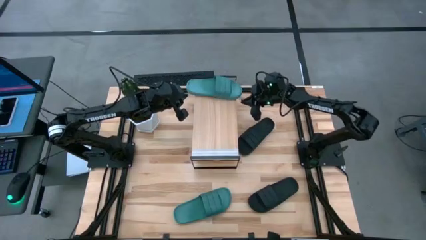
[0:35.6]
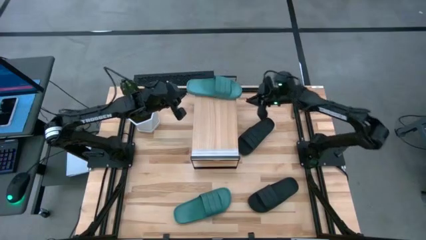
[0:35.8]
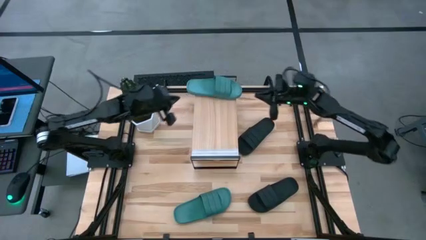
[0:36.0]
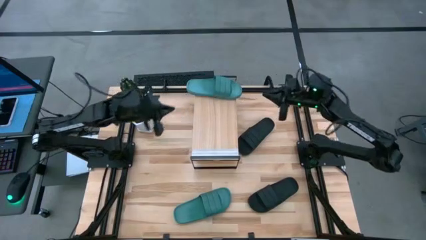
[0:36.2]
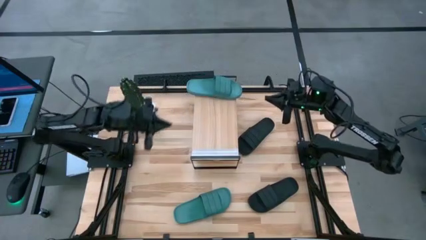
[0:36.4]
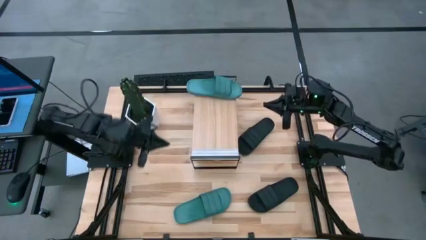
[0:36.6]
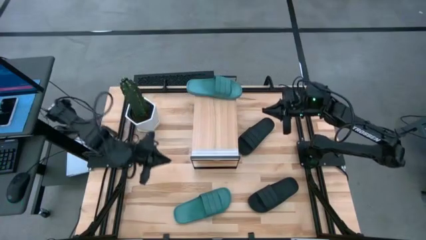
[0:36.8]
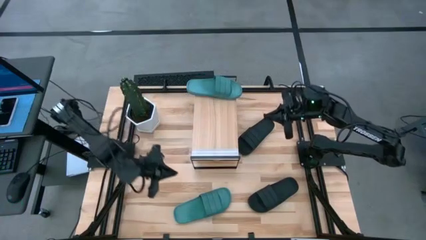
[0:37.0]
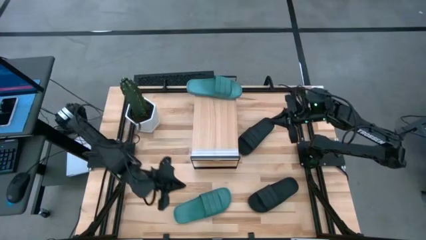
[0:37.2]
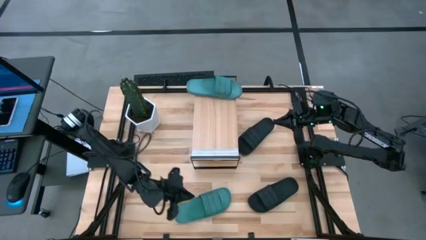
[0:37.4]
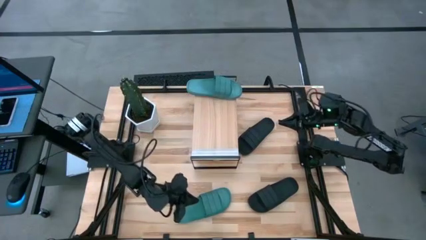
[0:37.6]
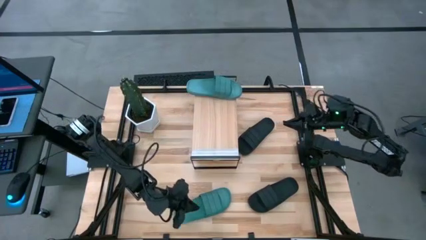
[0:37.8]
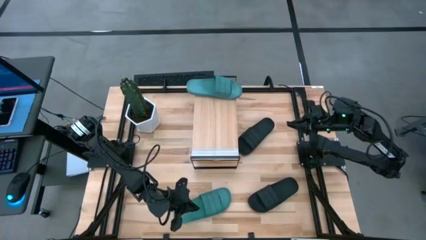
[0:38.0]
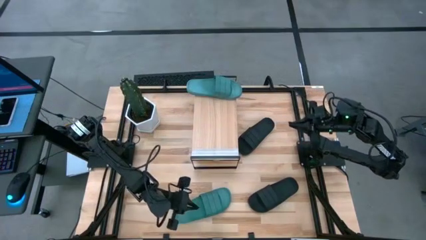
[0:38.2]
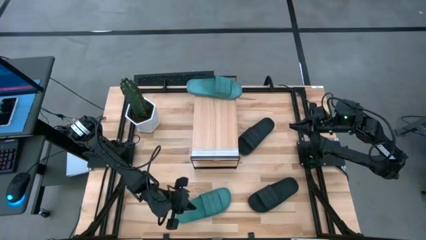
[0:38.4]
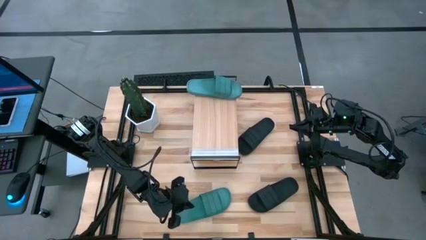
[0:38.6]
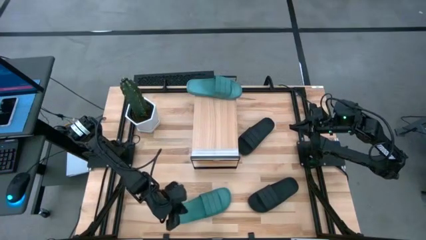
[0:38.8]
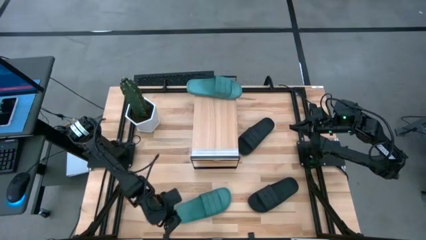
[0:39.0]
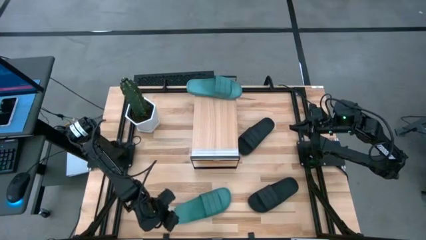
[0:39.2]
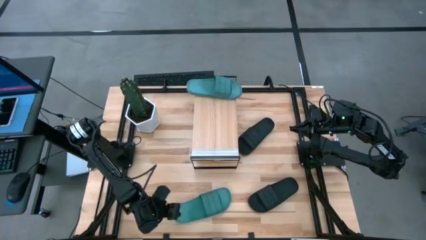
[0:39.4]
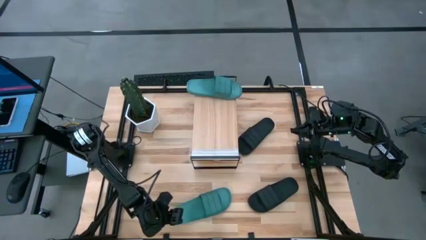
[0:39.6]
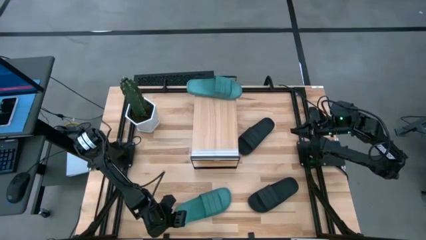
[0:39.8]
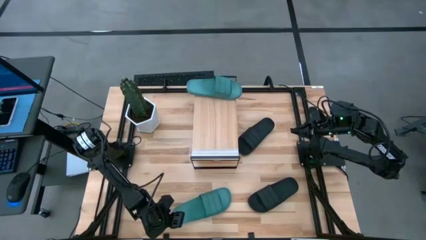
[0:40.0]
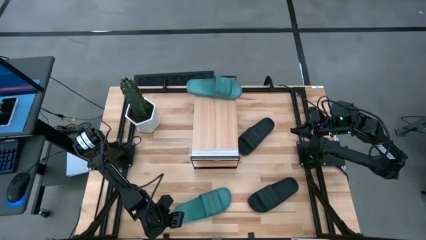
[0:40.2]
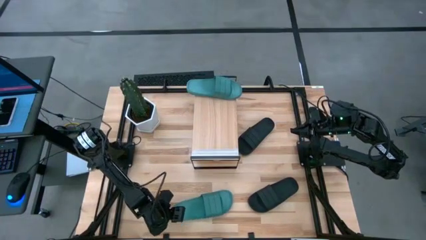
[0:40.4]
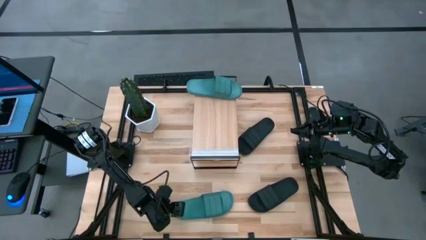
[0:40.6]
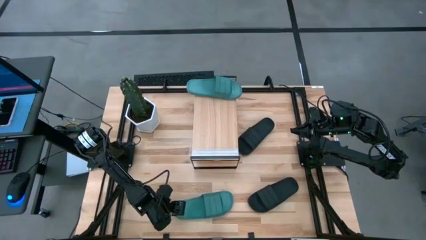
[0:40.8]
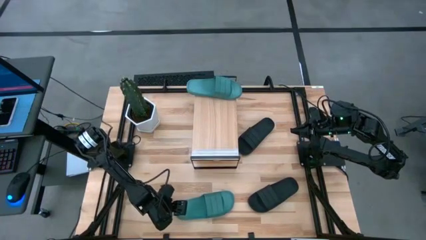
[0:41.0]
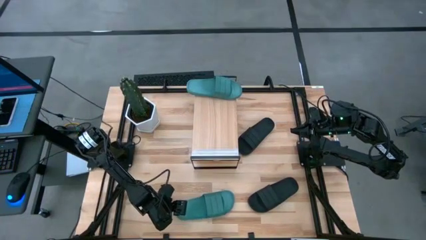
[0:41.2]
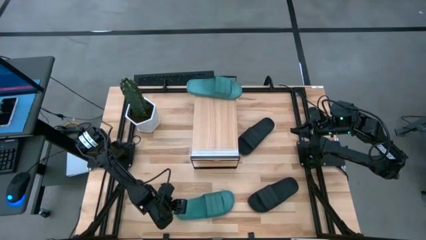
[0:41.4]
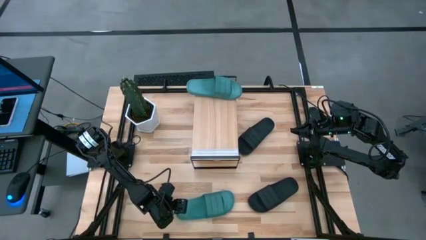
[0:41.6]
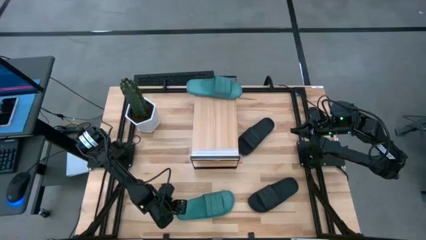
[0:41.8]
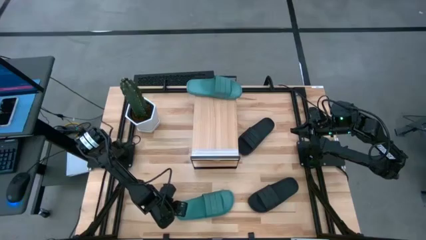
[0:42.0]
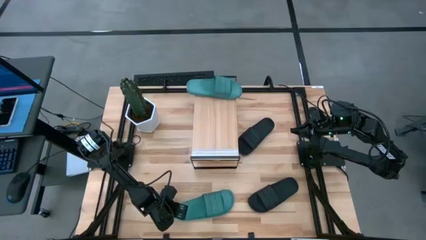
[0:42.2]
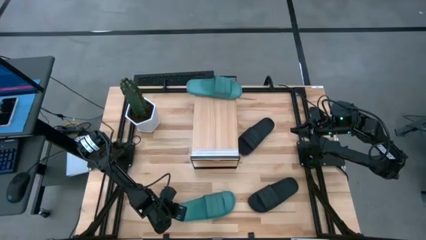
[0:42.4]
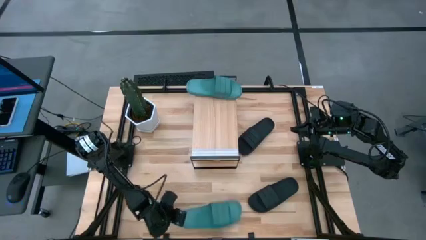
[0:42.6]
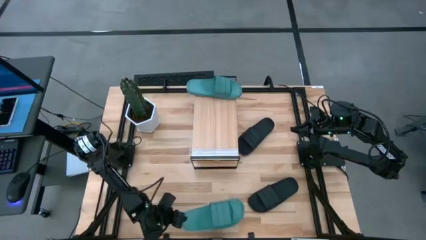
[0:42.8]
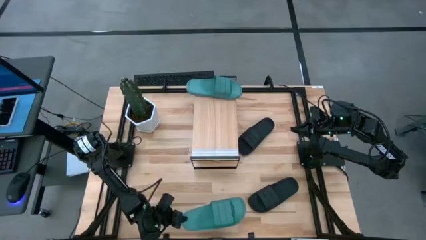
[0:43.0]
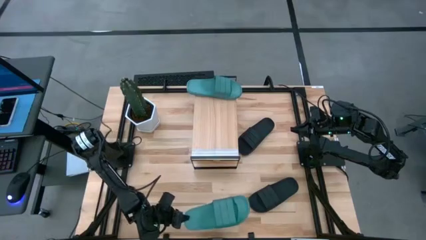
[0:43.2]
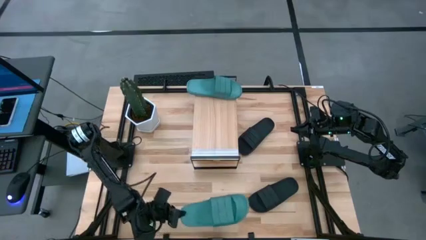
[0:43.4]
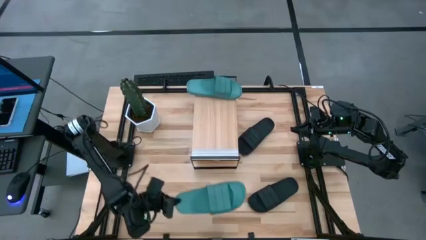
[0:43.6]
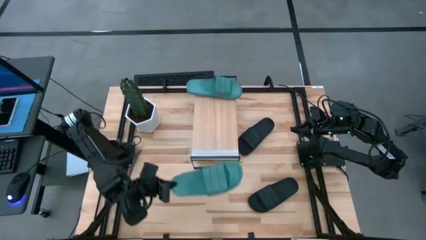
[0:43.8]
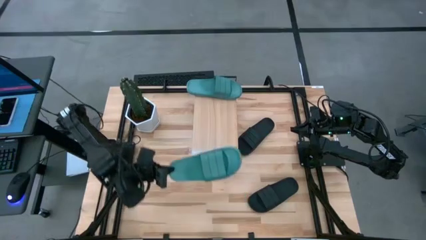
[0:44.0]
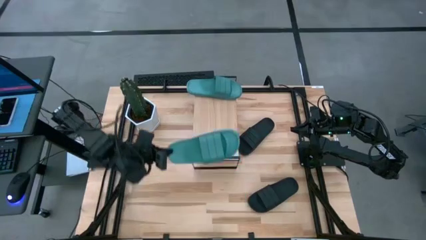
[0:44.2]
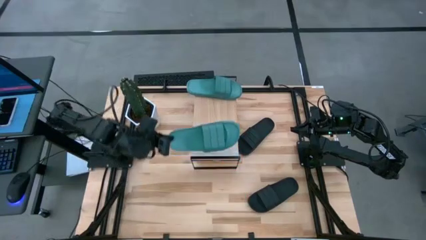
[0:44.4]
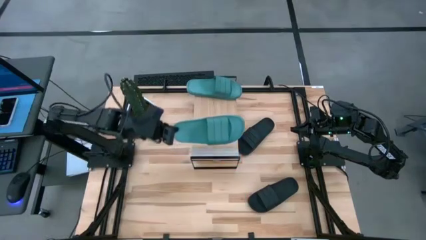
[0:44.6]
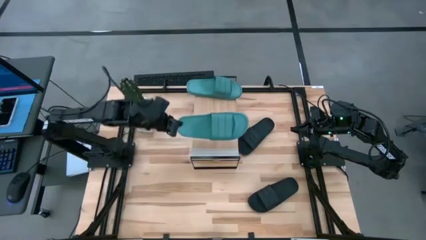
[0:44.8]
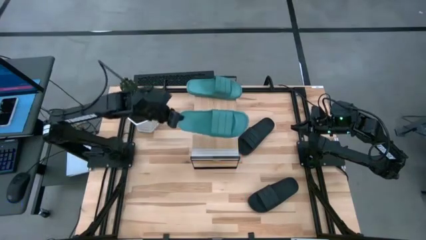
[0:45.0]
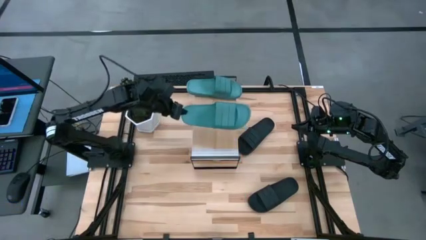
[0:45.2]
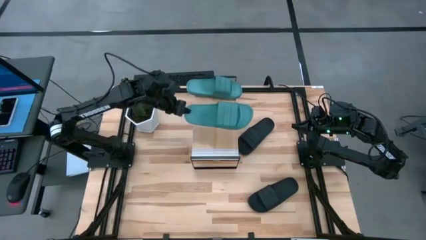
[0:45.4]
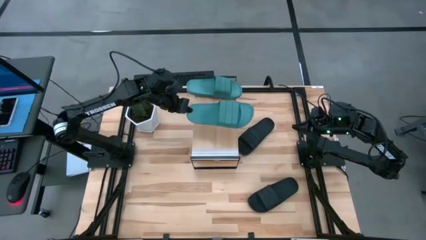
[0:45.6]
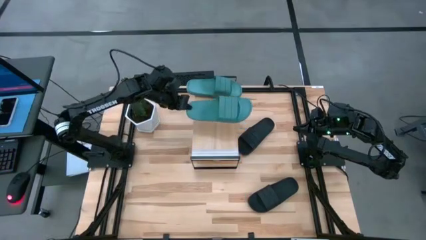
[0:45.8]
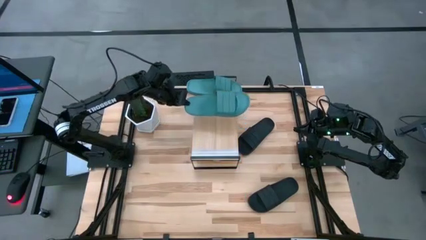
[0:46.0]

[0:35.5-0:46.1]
Task: Pick and place slides into the shelf
Put the green slide on the shelf

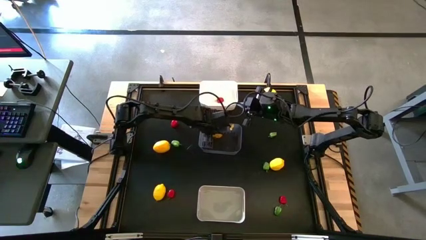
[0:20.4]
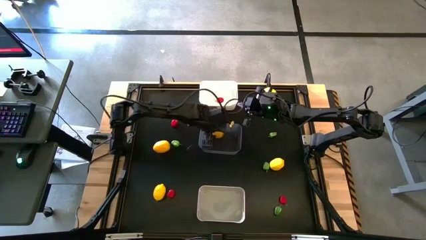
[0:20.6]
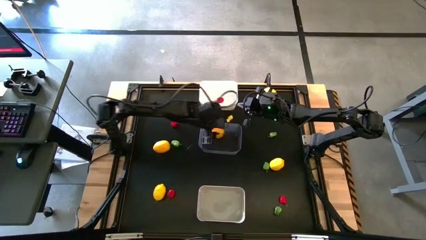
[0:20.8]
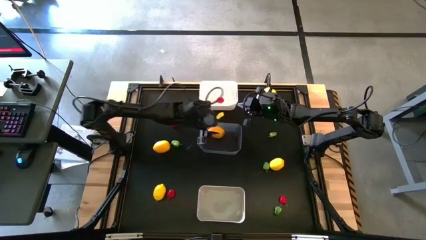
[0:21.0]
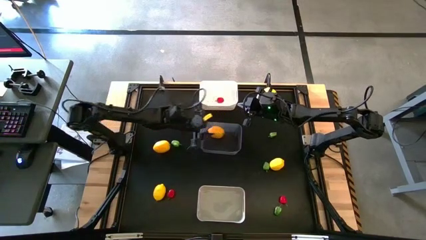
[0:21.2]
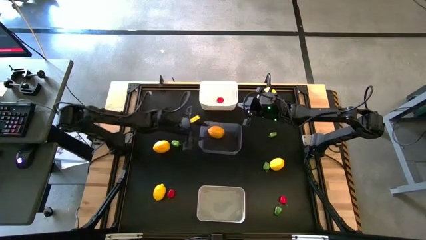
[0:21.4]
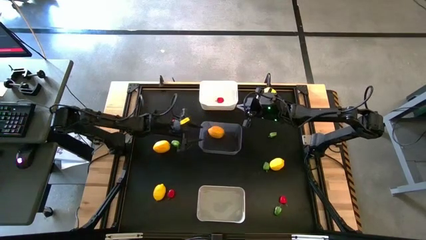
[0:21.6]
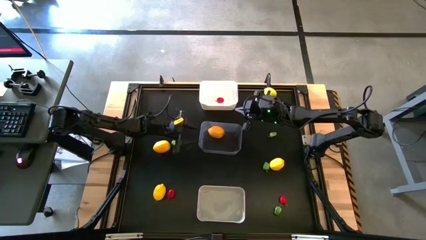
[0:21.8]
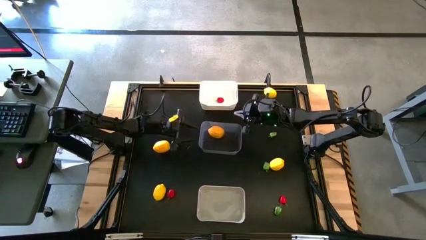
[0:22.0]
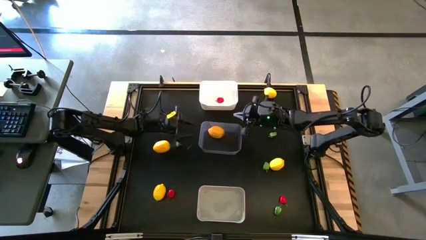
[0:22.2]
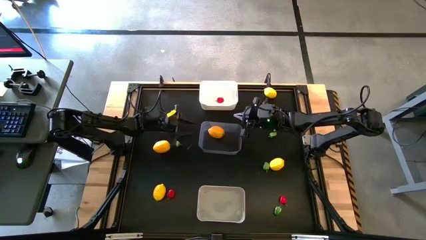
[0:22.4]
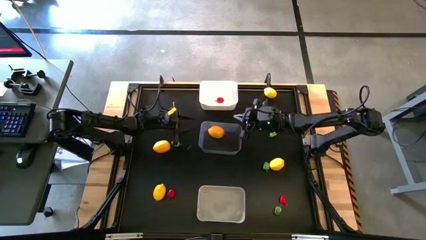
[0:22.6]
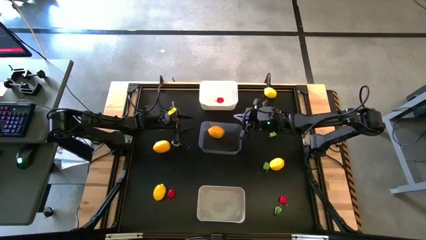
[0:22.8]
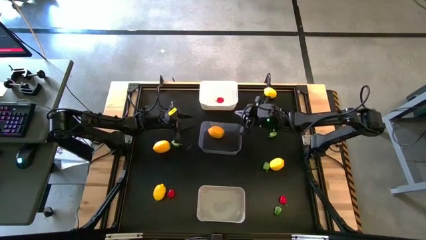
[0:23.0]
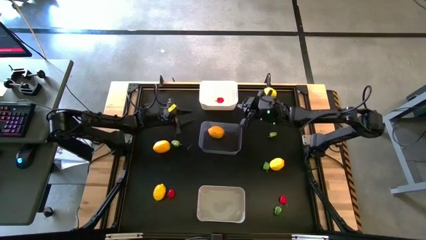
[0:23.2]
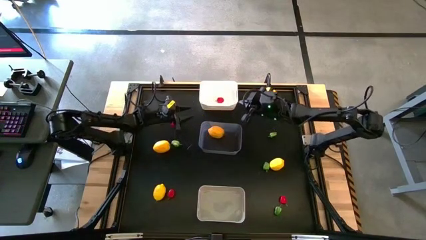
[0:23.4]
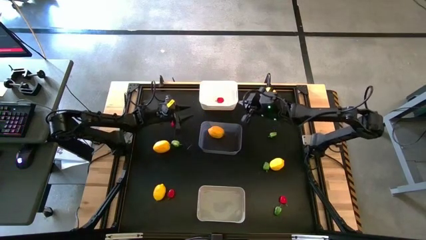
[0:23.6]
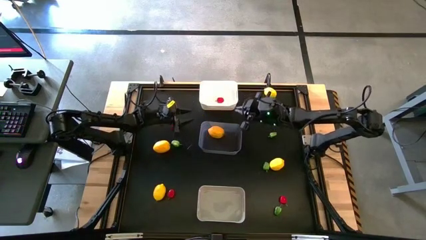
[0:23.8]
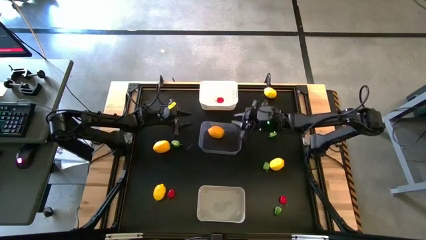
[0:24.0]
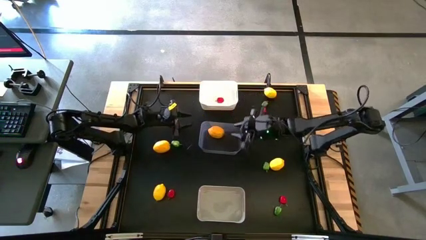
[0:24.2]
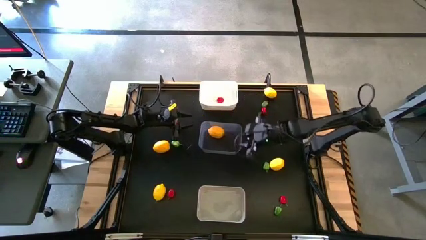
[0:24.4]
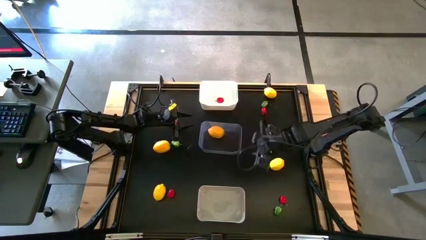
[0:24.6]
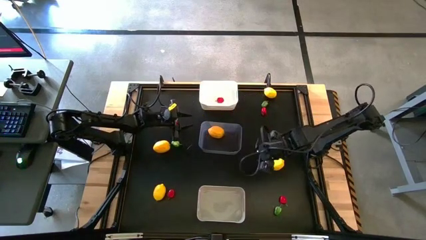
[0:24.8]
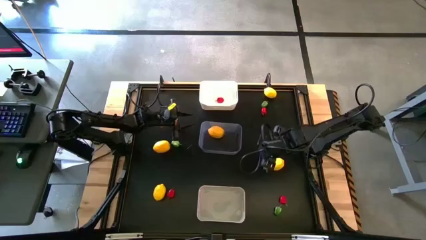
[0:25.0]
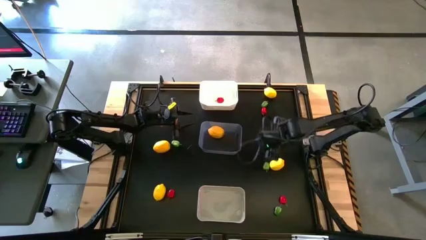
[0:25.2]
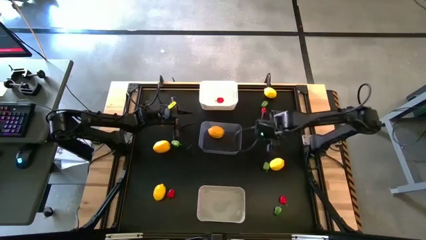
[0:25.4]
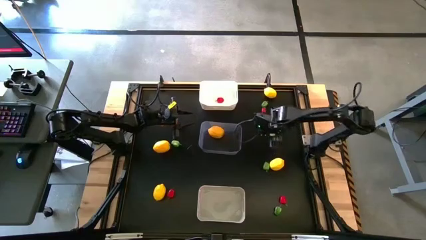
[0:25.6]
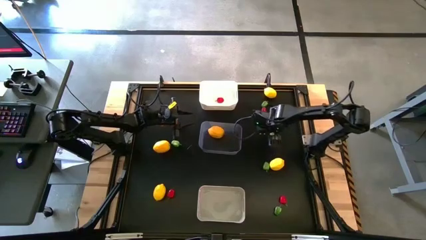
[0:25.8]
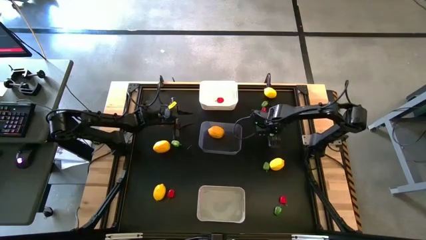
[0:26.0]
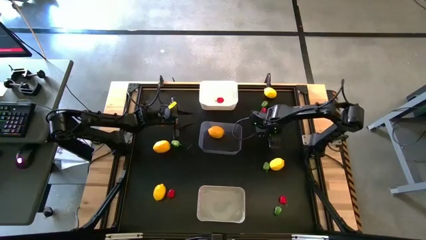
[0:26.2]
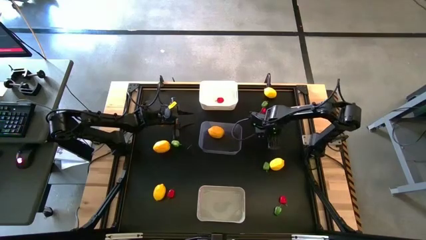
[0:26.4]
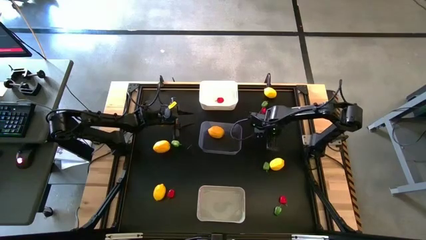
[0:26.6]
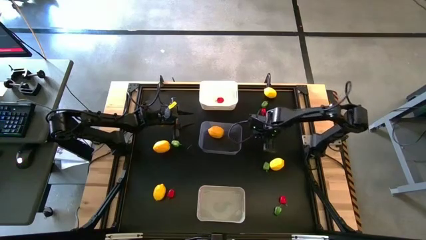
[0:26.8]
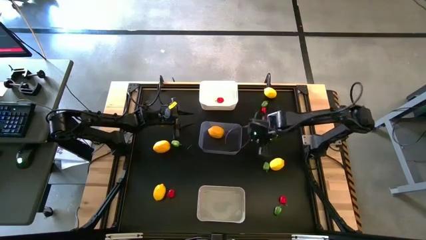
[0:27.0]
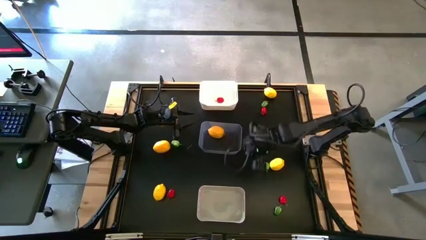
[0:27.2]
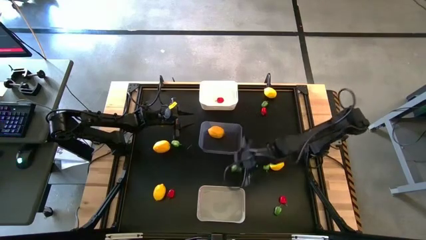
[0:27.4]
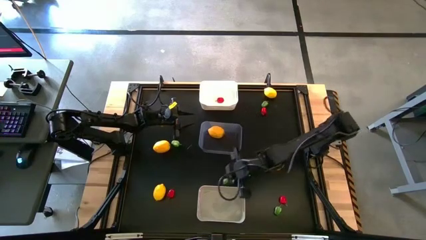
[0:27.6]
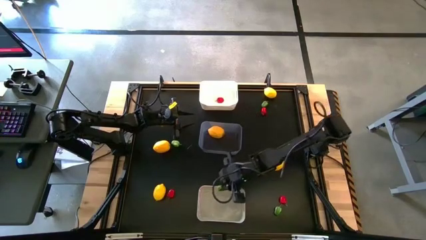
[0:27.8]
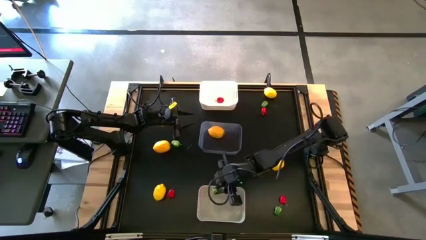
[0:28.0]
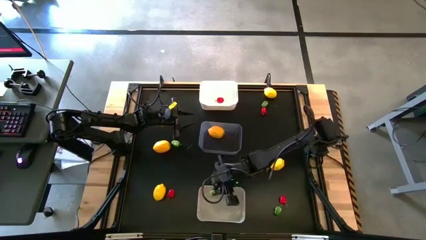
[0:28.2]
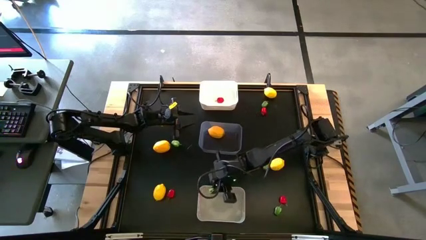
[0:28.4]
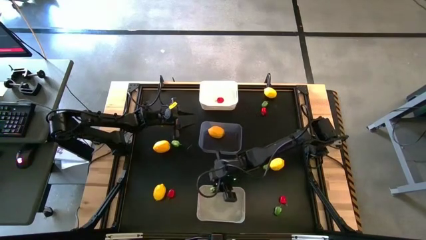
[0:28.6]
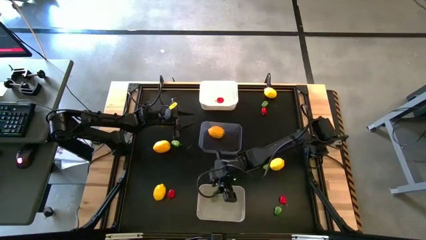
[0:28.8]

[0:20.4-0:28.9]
Task: Sort produce into baskets
Put the green chili pepper into the gray bin
